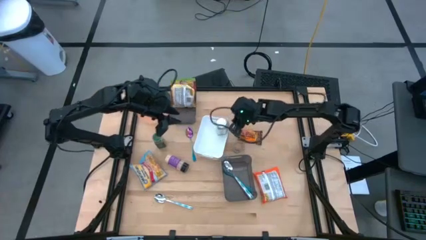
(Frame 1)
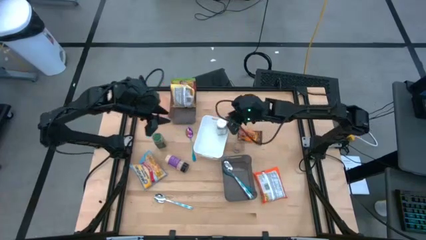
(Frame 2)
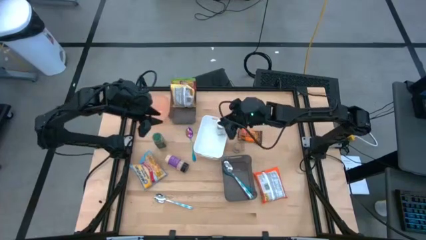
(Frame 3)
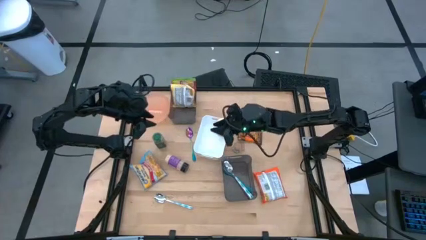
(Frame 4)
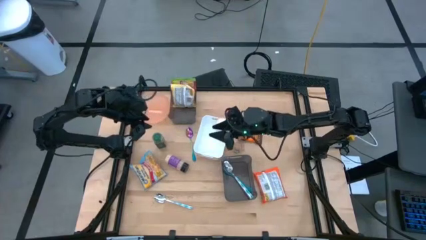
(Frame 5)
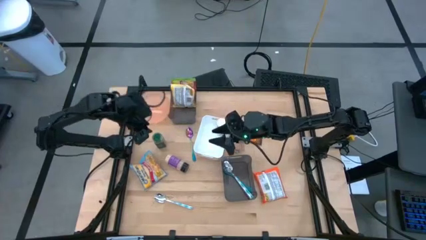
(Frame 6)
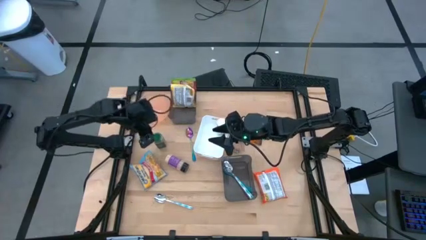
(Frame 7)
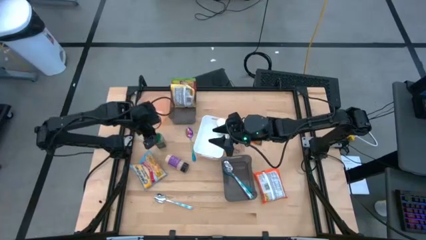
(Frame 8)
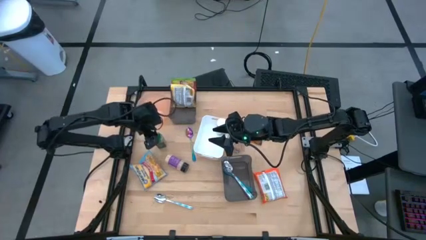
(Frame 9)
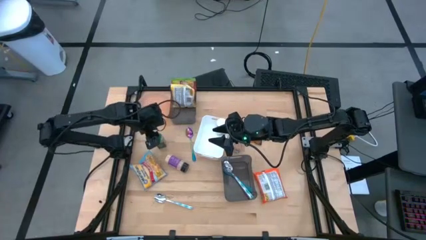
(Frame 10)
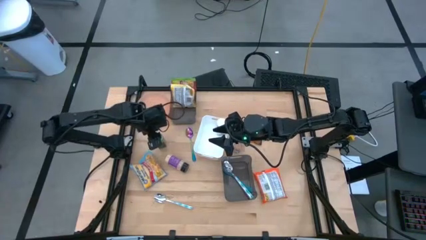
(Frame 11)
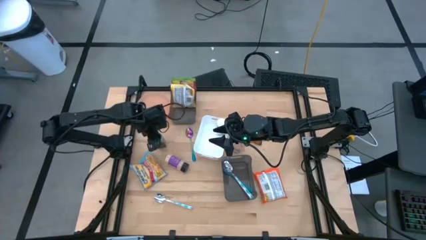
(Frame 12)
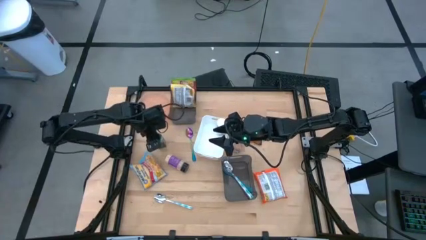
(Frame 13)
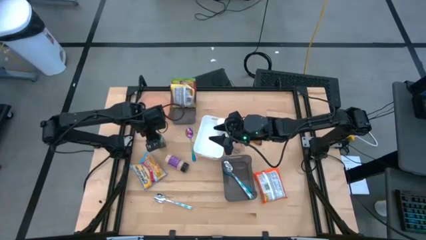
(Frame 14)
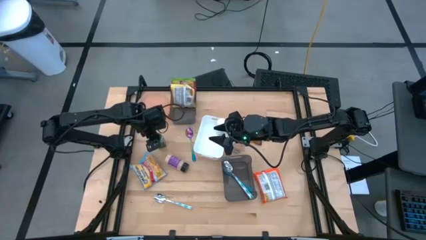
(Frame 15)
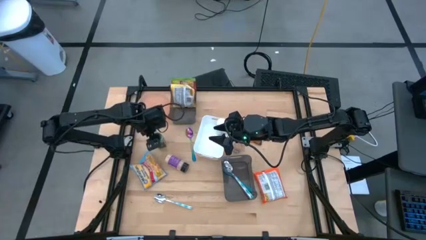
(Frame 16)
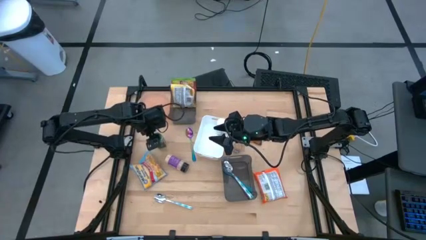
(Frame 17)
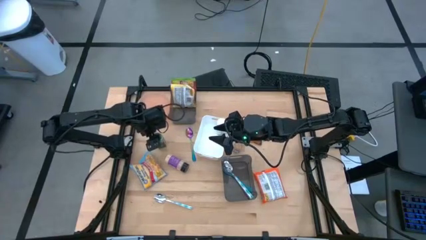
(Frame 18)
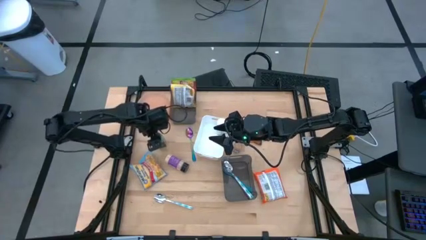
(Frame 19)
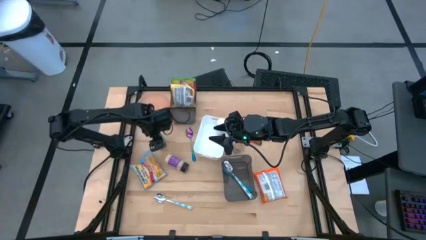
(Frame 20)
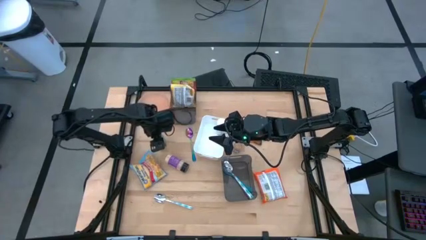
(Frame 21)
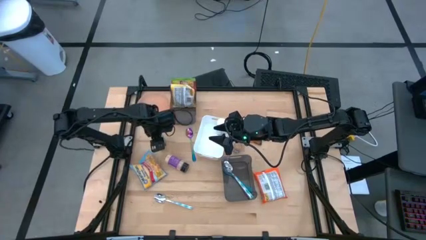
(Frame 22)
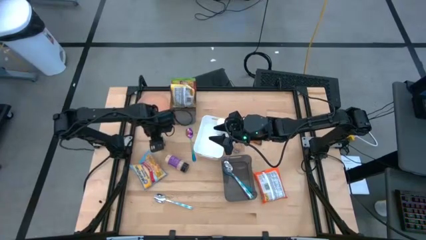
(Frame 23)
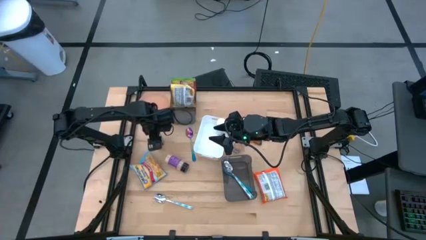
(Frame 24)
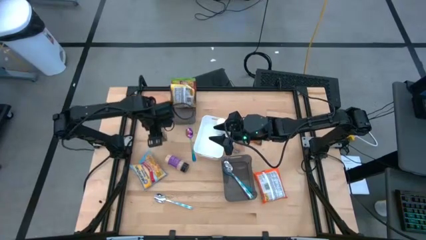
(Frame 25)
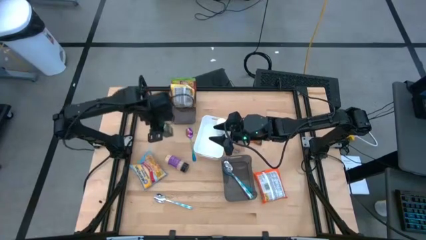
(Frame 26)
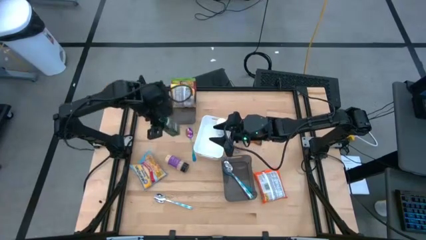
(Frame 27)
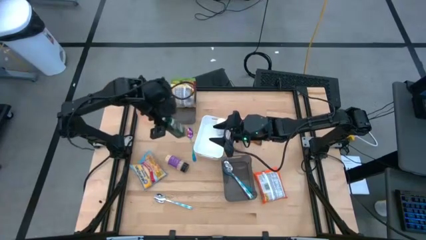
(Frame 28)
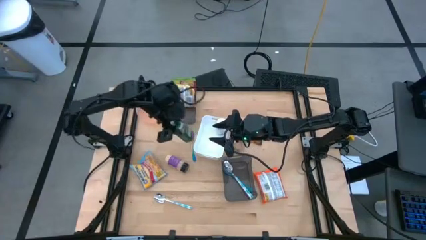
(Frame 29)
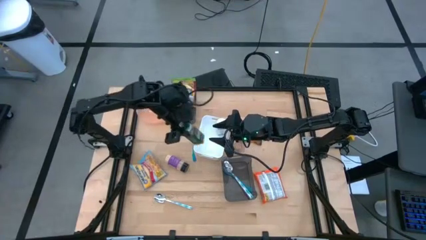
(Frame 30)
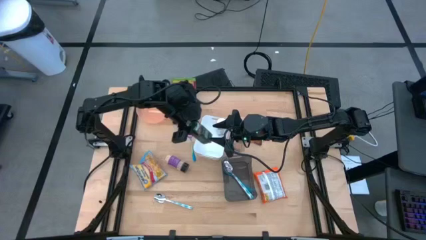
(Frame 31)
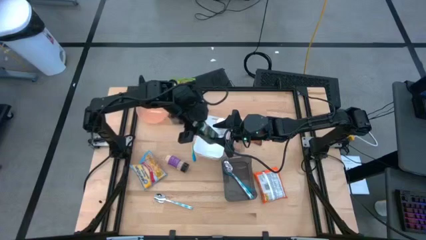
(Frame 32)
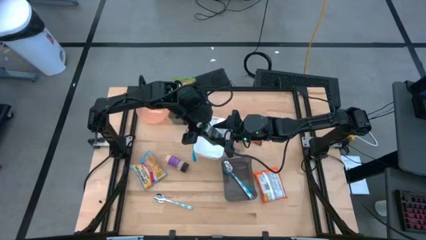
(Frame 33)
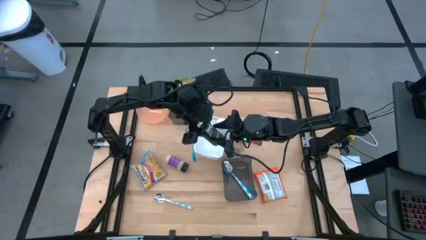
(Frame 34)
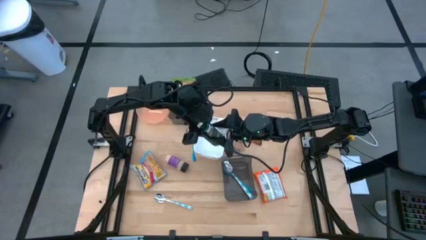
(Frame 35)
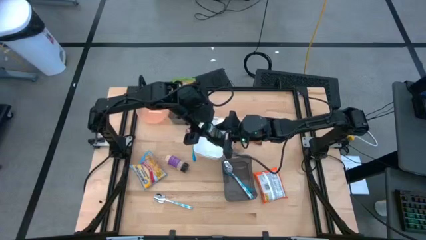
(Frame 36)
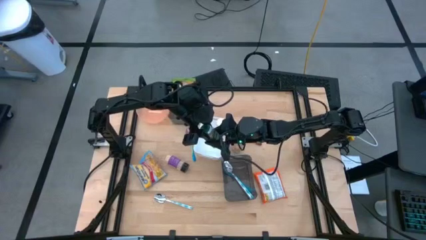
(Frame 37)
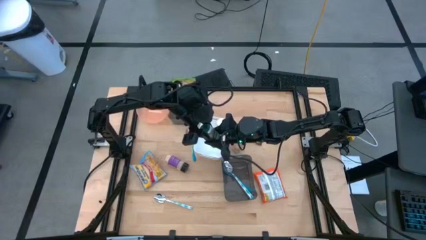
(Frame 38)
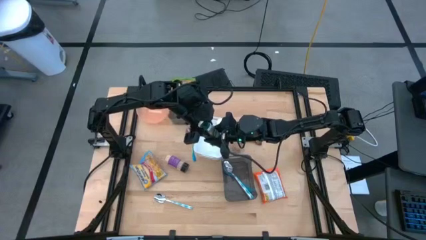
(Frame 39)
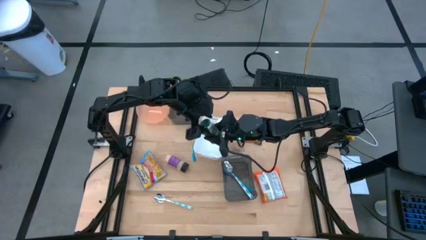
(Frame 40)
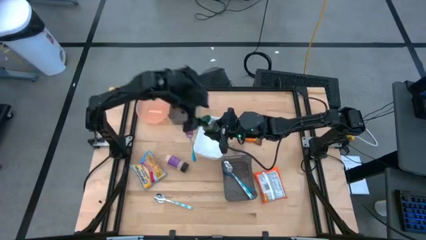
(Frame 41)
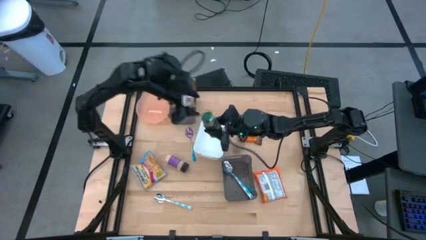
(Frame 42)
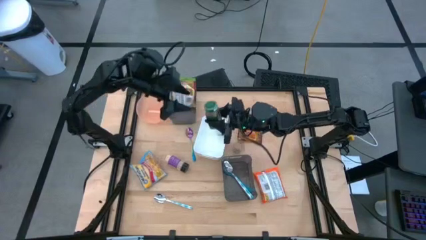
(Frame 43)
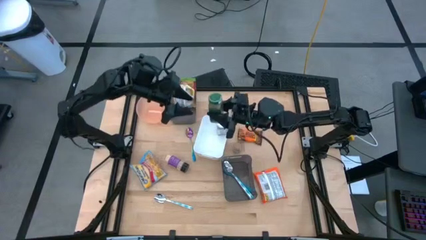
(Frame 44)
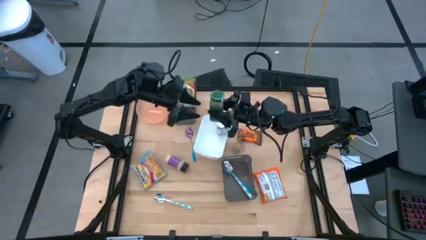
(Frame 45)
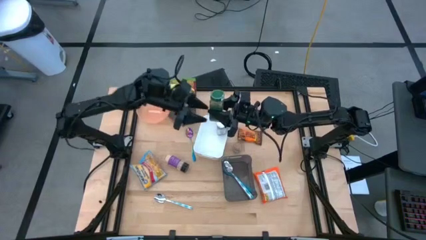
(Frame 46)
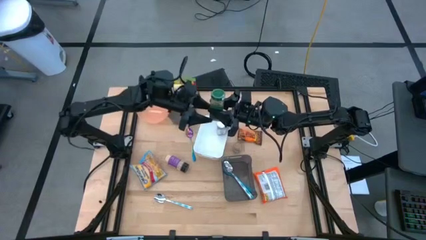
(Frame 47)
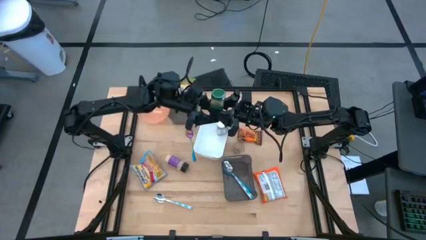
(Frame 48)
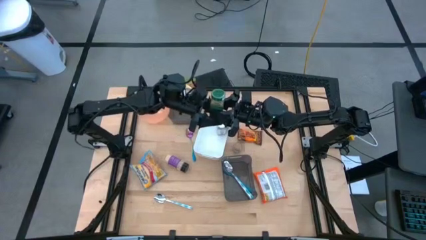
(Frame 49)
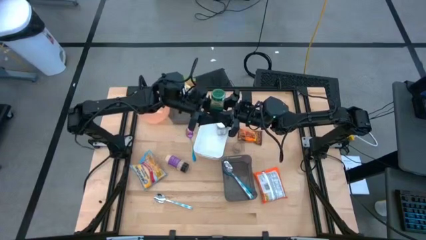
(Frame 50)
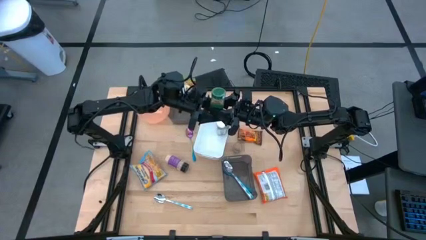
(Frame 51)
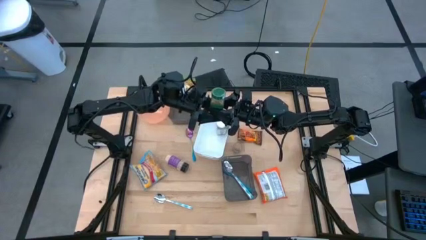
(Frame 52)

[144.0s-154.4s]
Task: Pick & Place Food Item
Put the green seasoning bottle into the white bin

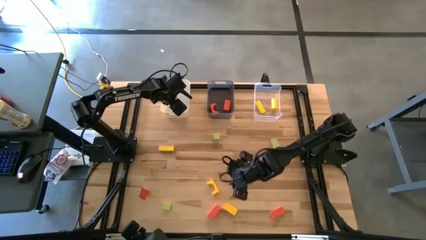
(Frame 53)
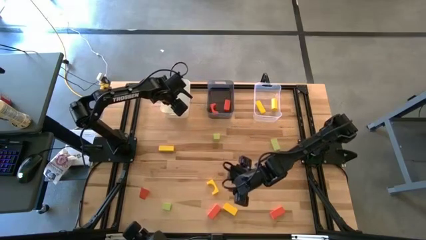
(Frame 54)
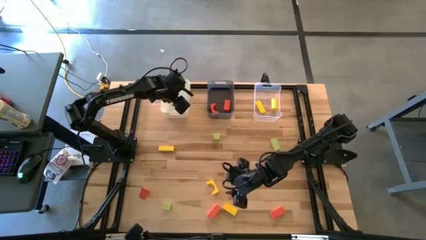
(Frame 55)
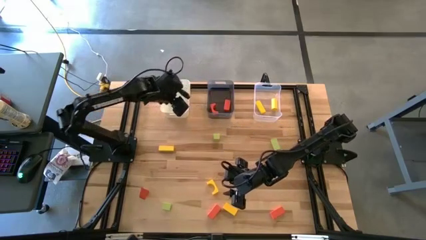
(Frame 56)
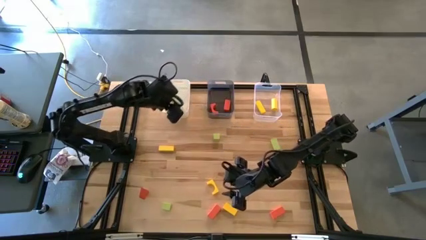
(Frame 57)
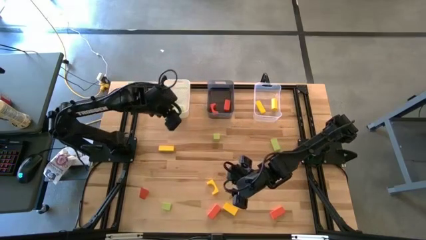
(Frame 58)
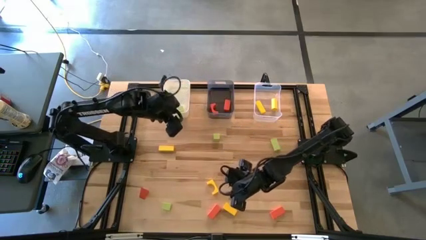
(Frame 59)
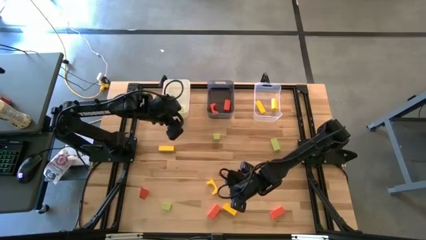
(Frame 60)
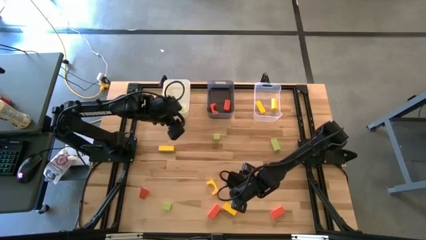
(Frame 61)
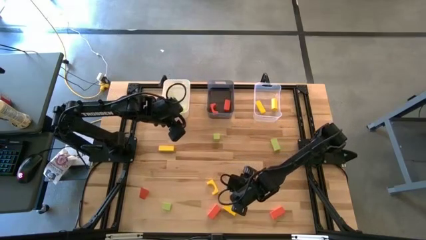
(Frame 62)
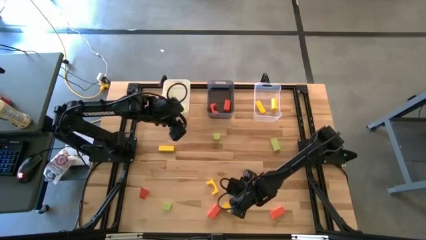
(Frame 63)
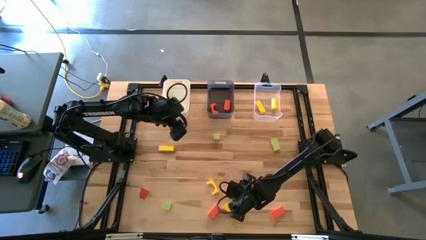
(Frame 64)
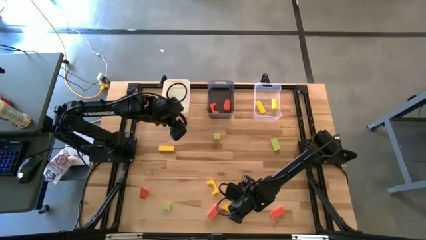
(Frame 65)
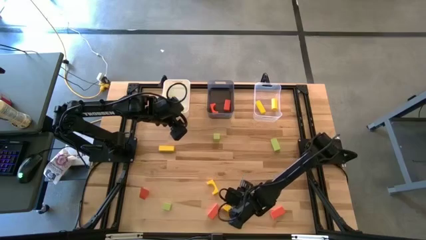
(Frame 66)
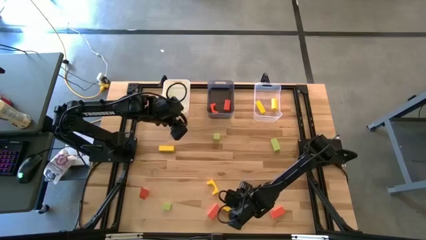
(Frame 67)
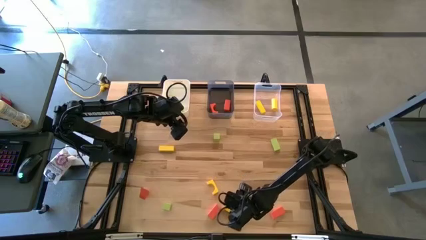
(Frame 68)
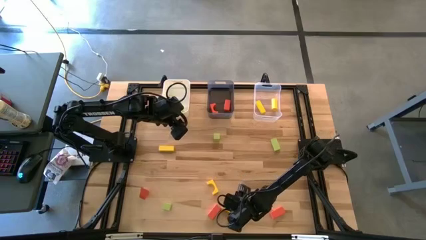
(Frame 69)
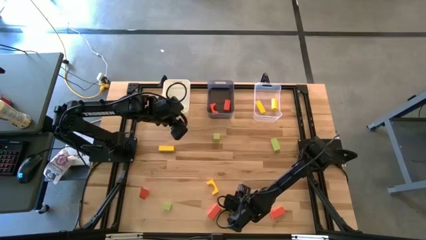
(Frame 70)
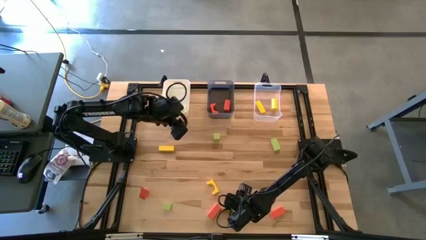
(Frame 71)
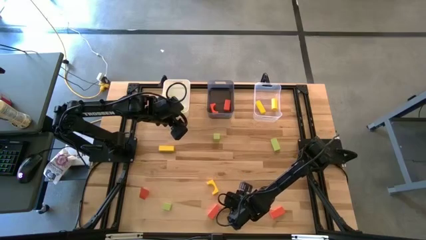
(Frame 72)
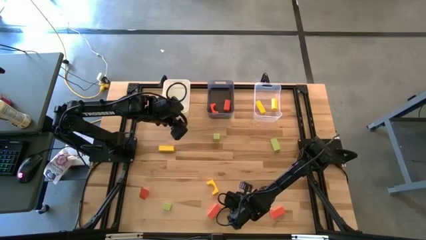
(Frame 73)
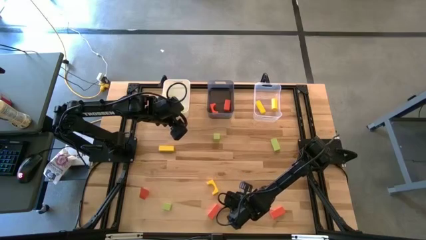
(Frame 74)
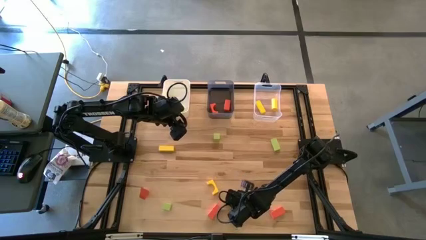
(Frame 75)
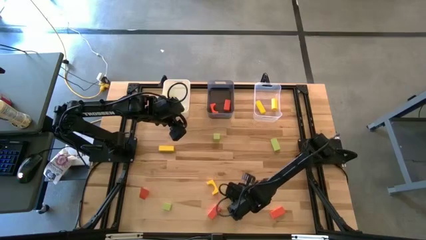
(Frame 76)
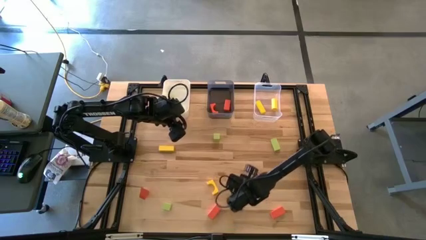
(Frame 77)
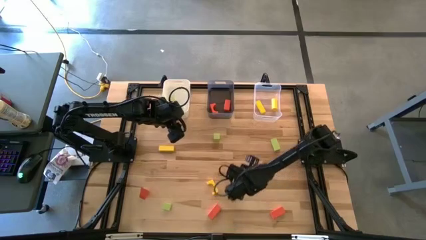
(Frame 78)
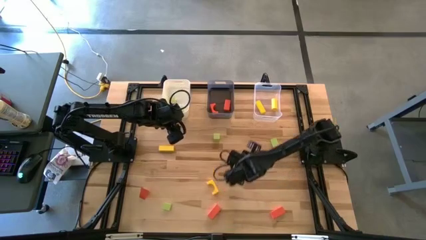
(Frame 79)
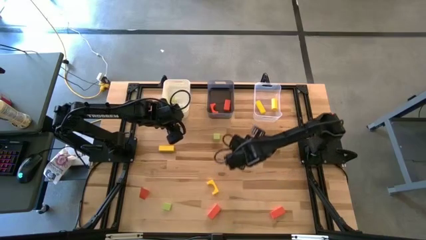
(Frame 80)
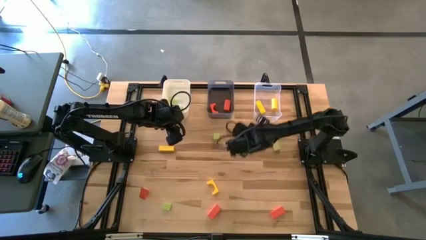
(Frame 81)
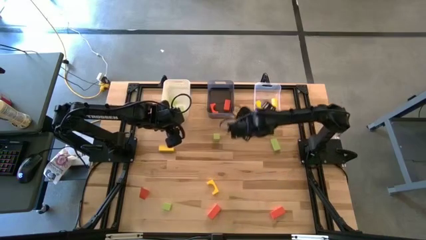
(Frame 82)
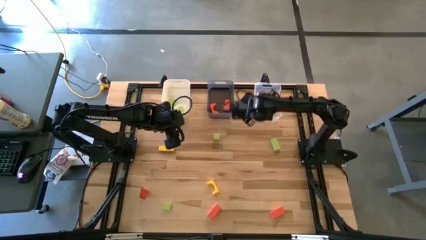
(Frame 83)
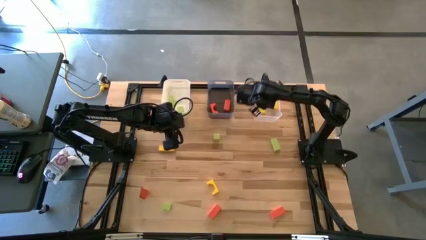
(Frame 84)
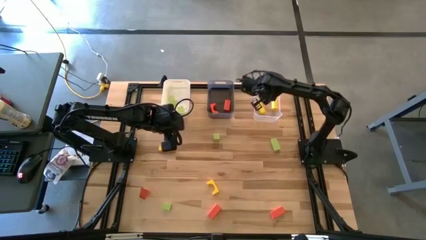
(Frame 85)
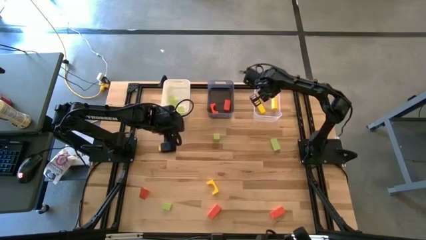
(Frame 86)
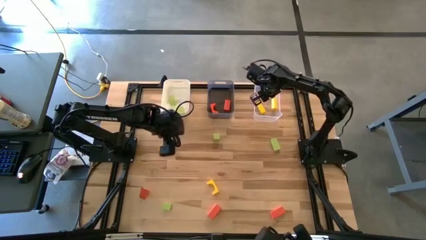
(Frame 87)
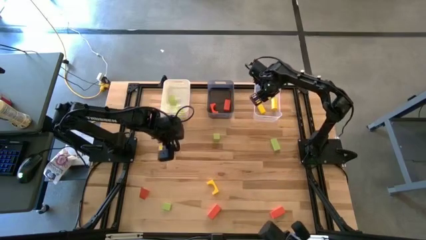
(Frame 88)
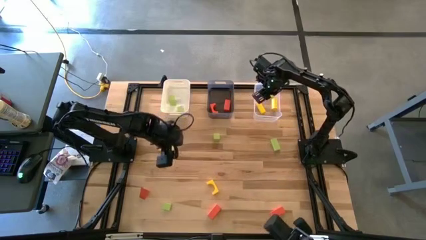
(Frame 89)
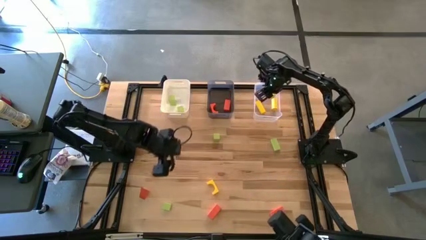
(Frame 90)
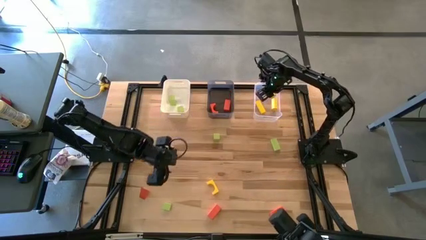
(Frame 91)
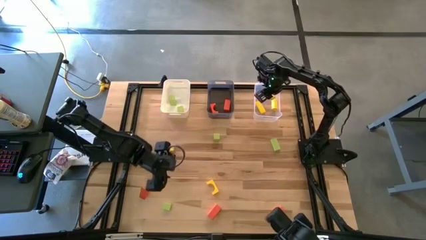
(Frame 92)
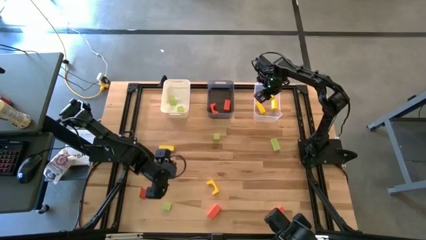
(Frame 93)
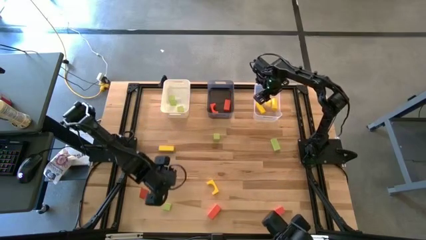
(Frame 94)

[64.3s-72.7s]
Task: Sort & place blocks by color
Put the yellow block into the transparent bin
